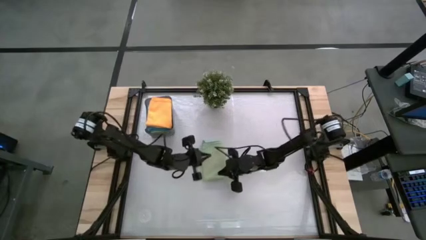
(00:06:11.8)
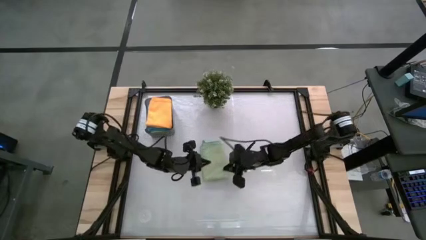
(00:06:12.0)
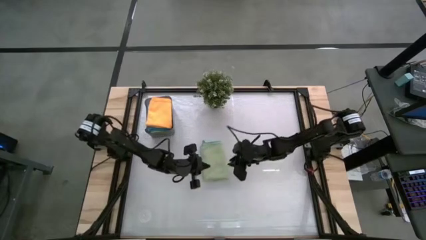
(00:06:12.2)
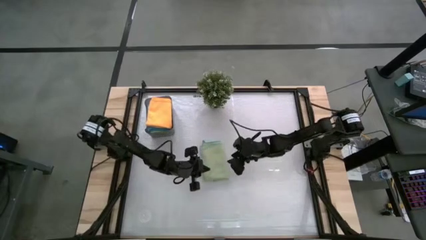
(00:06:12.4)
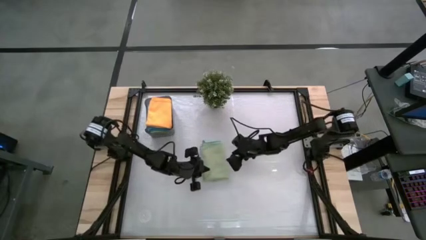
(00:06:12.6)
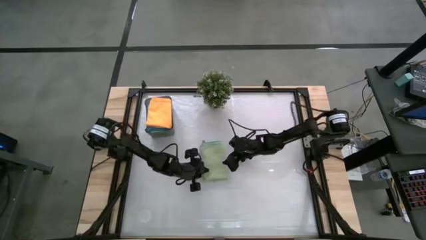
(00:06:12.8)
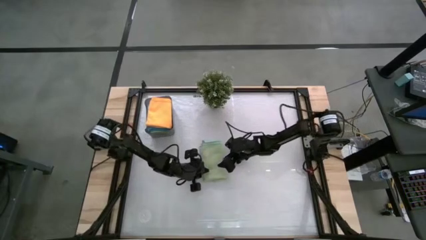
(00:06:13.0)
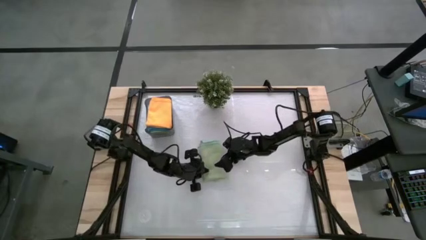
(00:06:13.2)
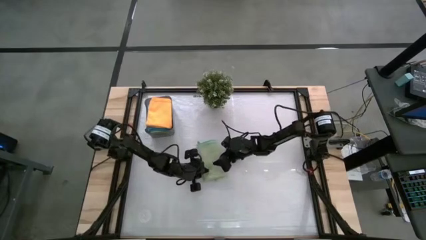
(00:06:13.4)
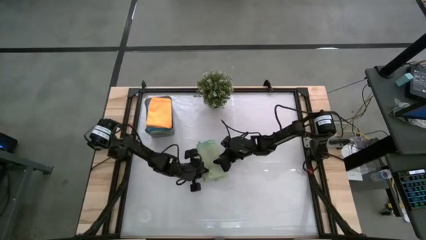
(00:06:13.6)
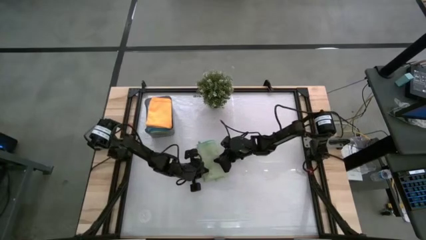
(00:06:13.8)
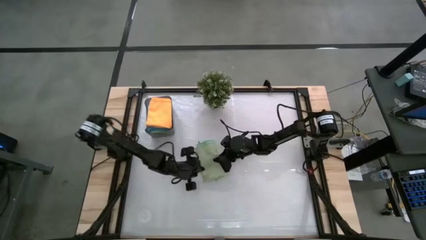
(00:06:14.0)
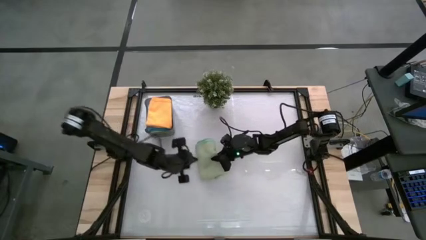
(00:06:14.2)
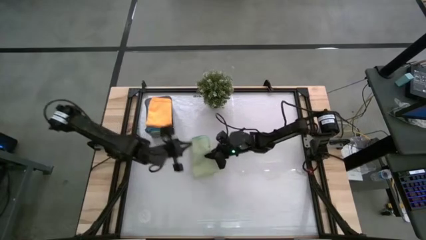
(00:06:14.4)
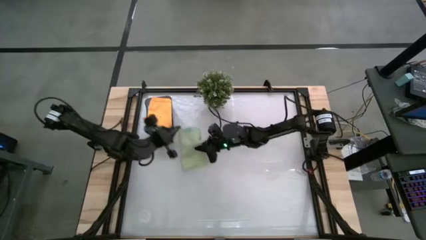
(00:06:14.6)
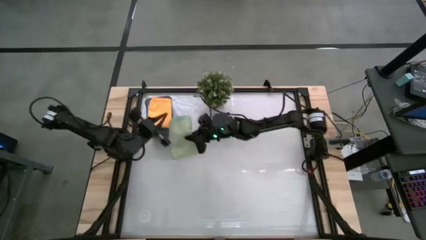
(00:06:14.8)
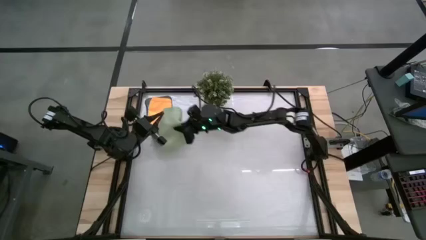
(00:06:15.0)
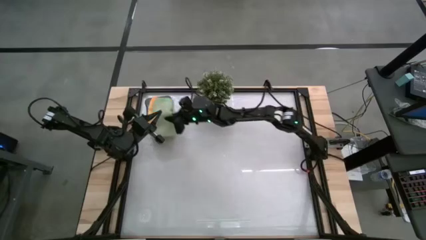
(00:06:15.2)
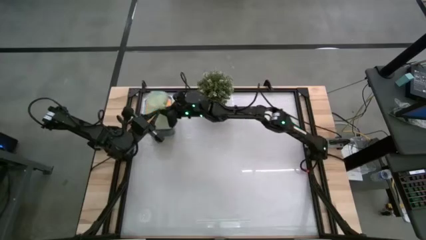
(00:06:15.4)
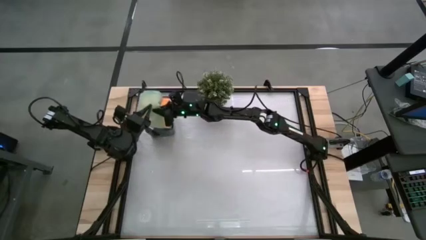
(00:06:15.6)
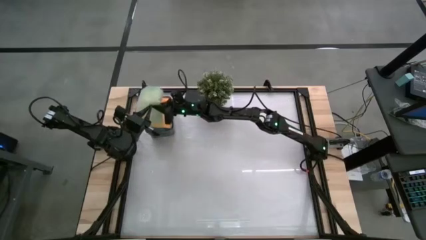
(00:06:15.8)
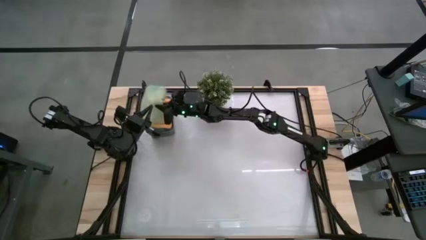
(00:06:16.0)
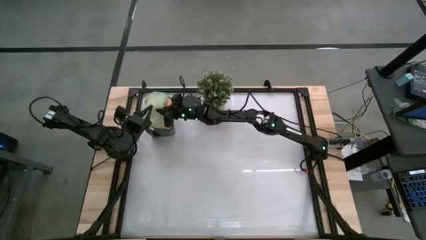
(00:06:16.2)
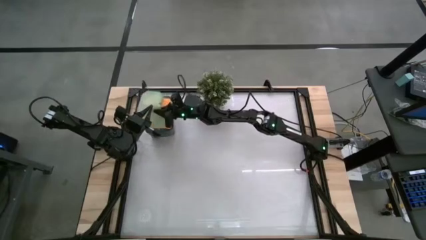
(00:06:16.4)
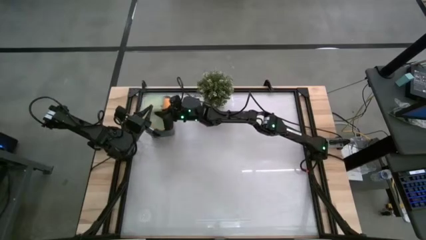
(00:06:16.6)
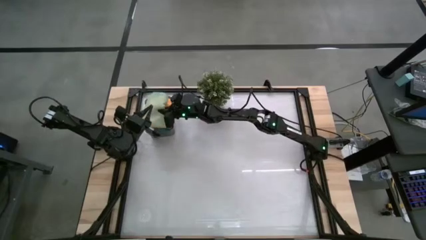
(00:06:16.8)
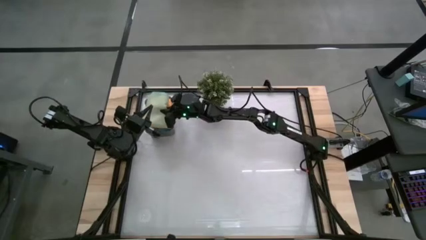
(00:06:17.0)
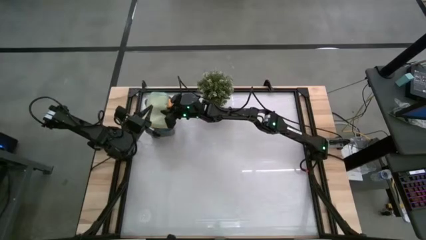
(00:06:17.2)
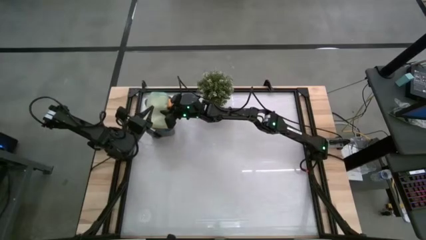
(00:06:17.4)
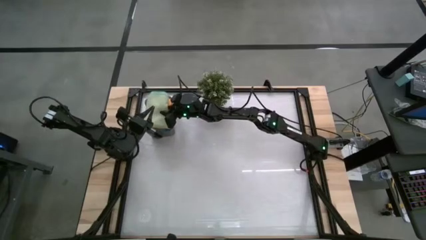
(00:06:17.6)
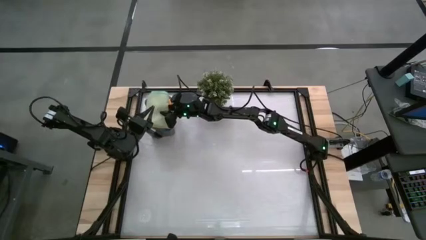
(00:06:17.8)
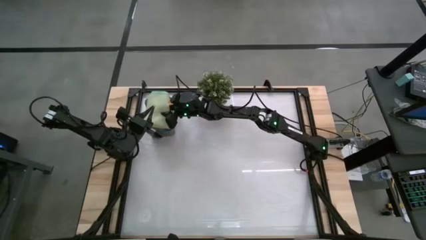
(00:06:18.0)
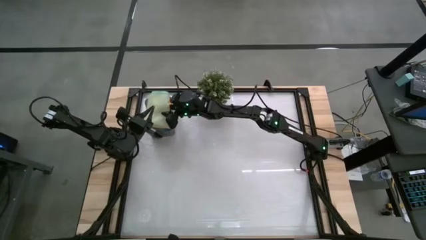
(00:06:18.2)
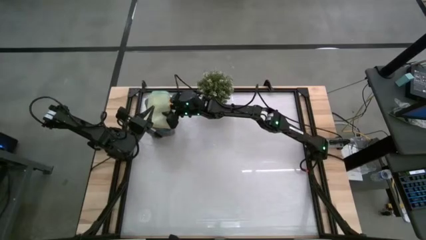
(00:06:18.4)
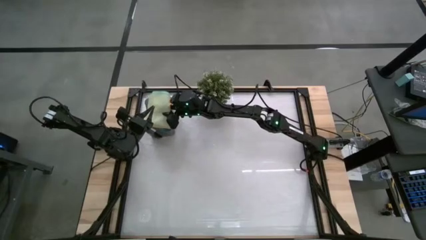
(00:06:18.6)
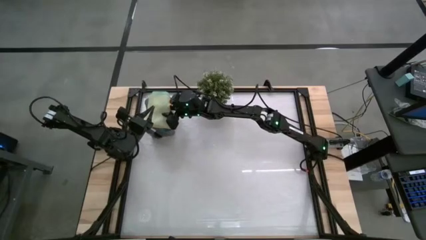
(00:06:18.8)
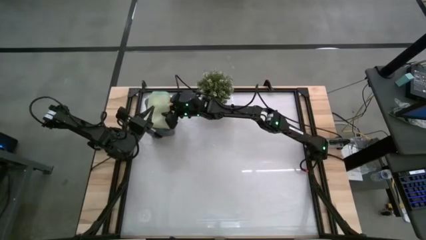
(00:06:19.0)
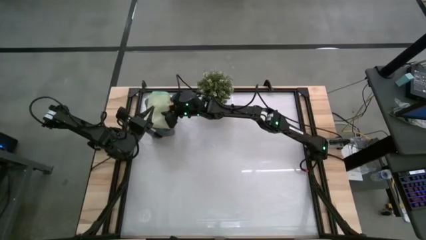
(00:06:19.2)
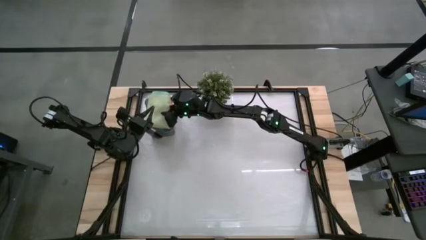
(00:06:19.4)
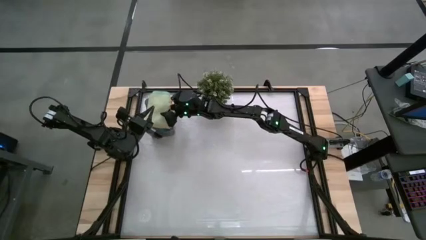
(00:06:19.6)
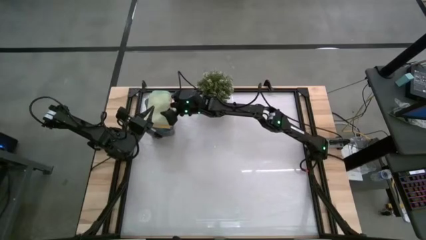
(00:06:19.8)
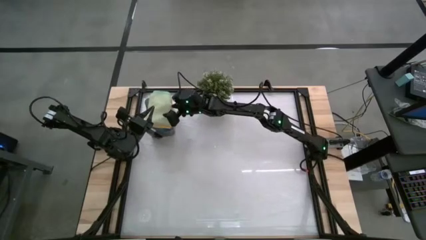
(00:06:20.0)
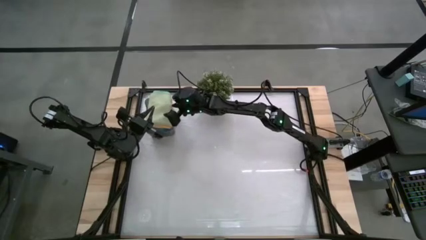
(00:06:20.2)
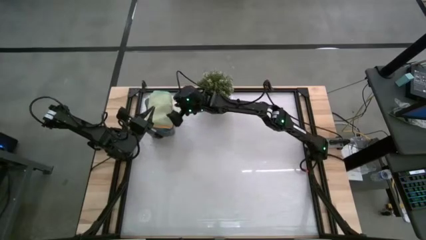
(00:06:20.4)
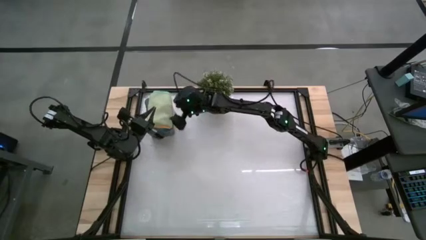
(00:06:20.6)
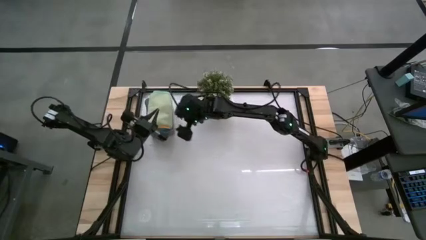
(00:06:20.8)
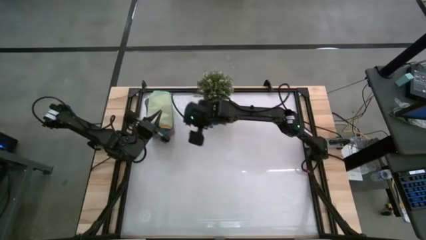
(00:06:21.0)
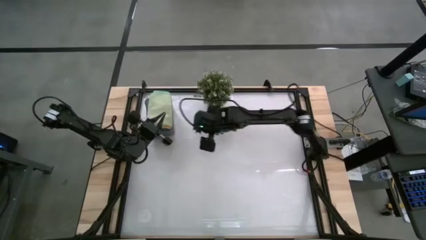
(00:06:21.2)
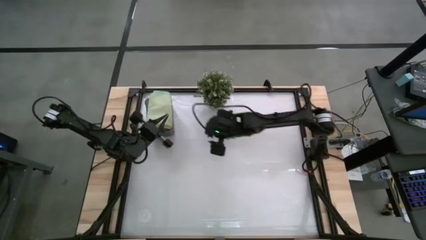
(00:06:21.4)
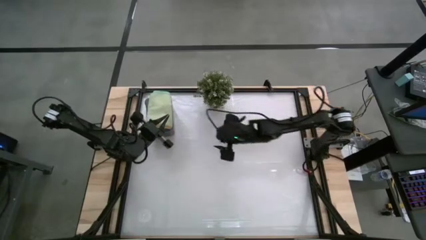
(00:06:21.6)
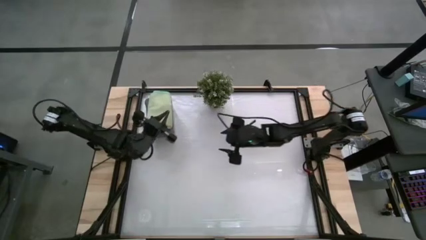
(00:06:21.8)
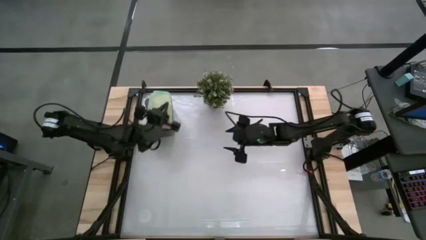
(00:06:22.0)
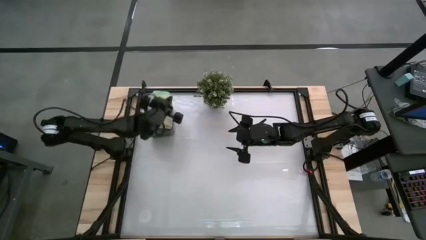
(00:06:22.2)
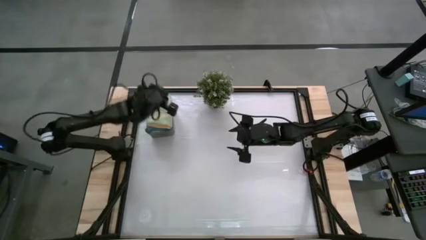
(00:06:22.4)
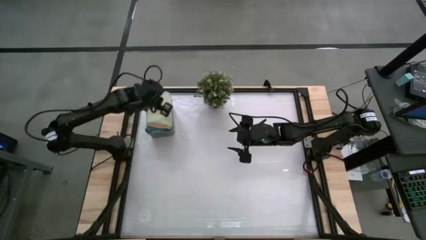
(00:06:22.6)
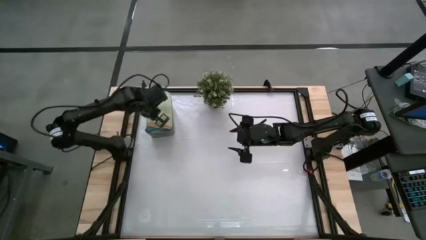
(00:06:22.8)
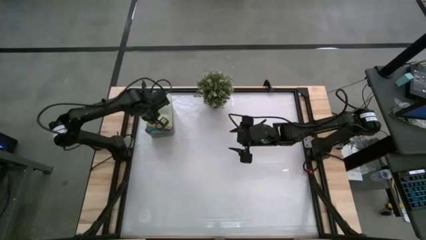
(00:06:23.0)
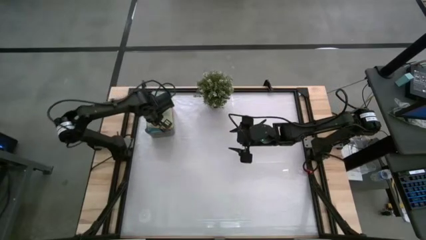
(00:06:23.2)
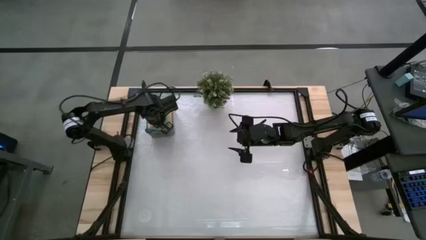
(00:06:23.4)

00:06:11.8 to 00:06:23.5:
Task: Fold microfiber towels
Put the green microfiber cloth into the black bin

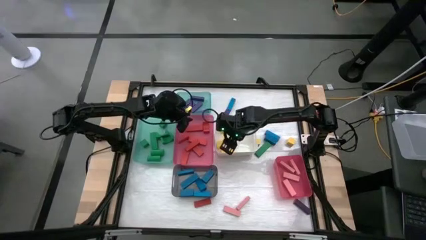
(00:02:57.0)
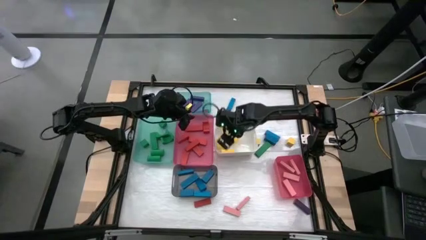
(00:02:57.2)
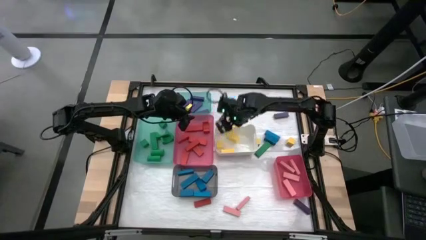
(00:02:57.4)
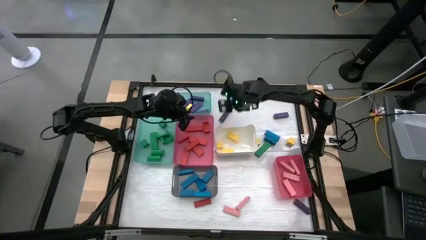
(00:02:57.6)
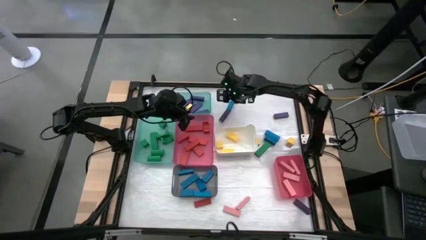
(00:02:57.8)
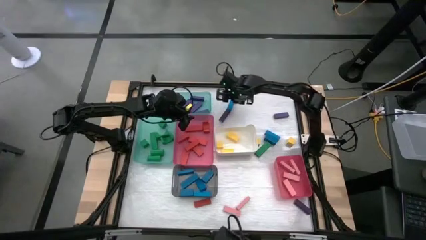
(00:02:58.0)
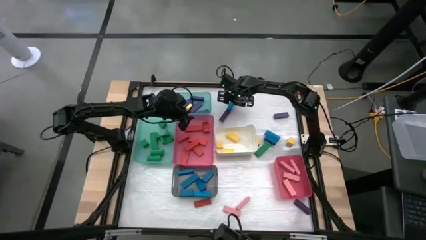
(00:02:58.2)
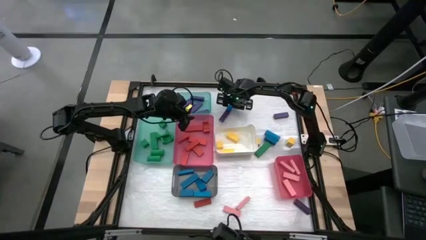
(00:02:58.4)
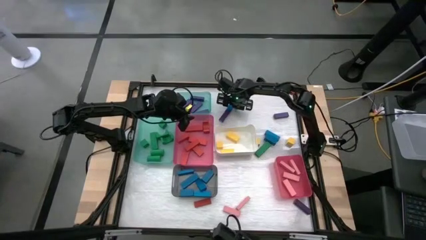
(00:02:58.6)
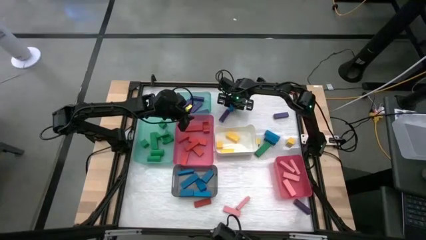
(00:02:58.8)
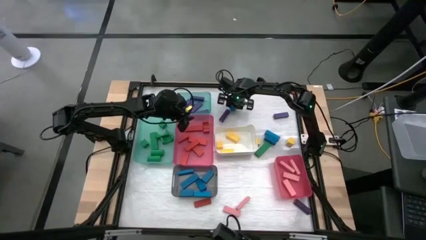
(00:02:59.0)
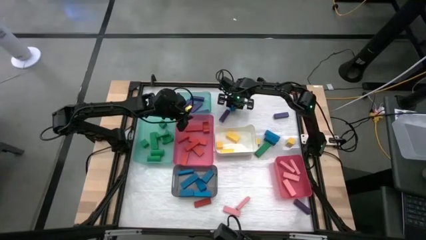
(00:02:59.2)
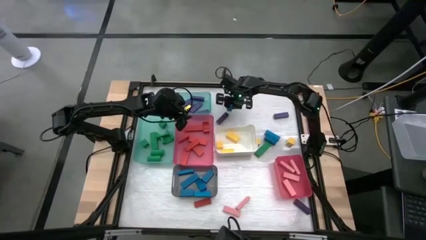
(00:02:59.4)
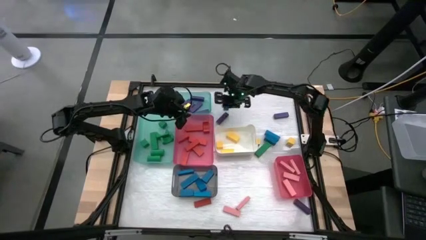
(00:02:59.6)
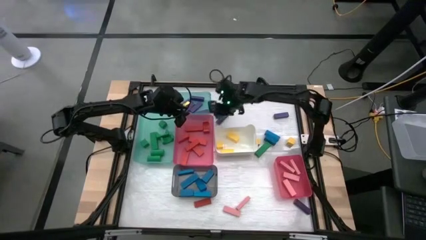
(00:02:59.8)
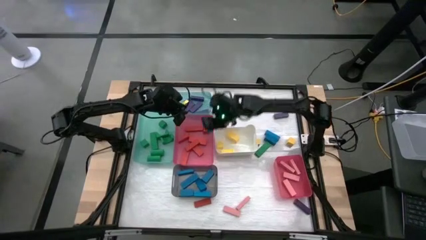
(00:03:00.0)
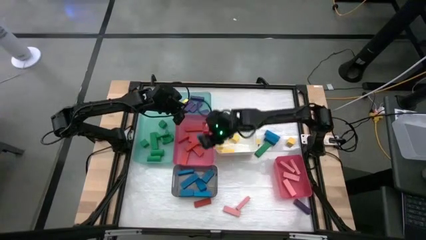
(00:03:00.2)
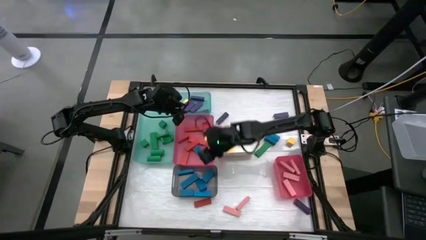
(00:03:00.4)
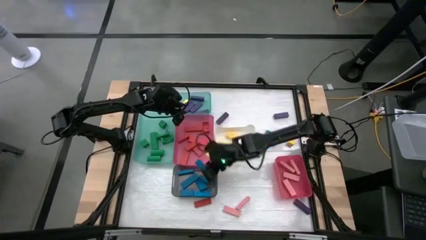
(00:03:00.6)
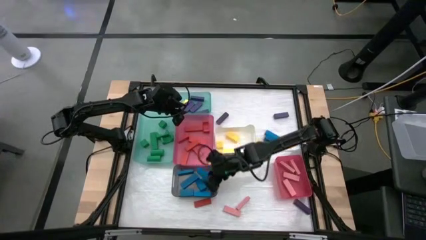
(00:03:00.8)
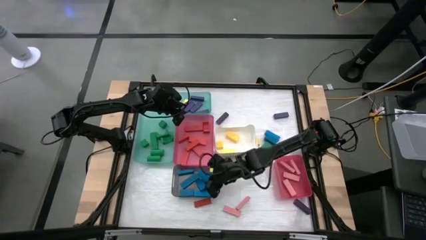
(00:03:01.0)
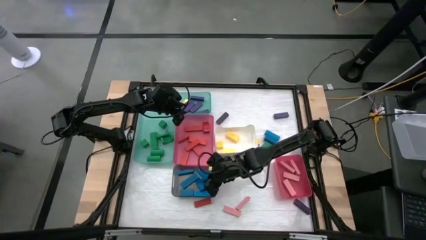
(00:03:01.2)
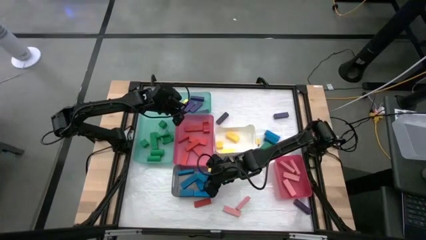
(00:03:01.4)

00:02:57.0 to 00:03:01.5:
Task: Sort blocks
Put the blue block into the black bin
